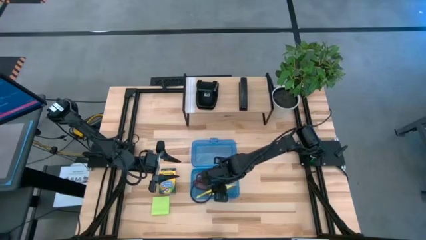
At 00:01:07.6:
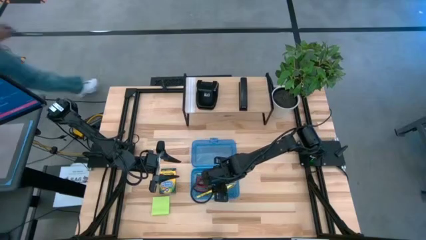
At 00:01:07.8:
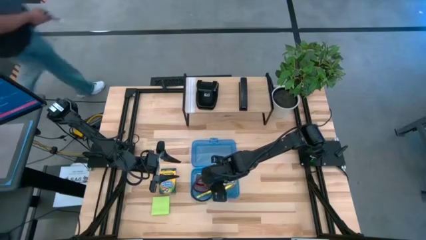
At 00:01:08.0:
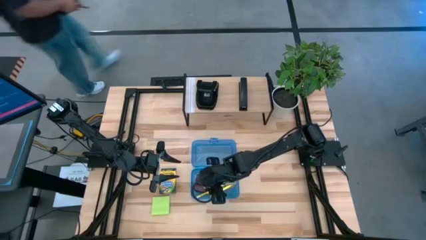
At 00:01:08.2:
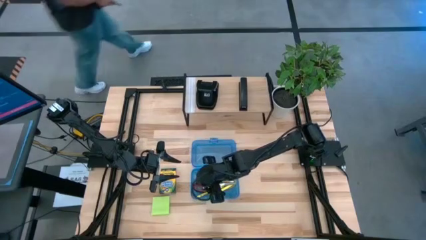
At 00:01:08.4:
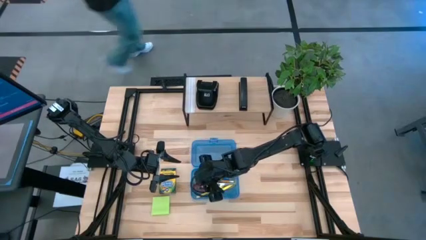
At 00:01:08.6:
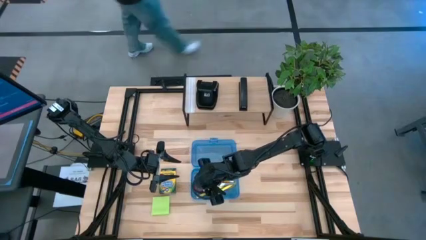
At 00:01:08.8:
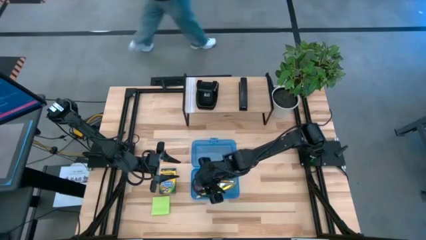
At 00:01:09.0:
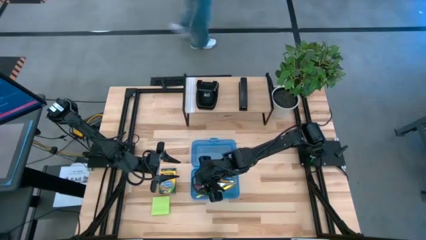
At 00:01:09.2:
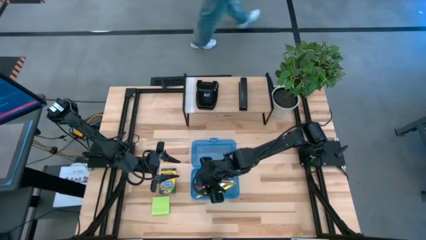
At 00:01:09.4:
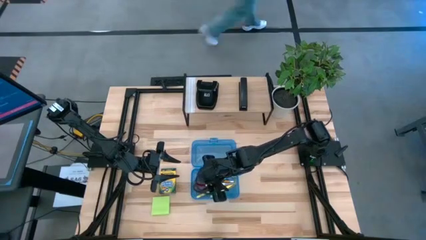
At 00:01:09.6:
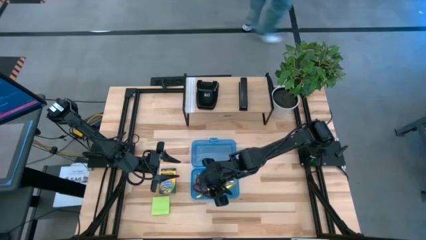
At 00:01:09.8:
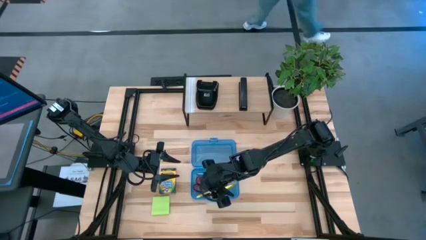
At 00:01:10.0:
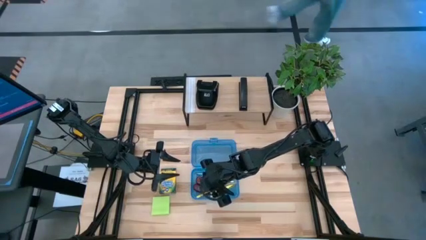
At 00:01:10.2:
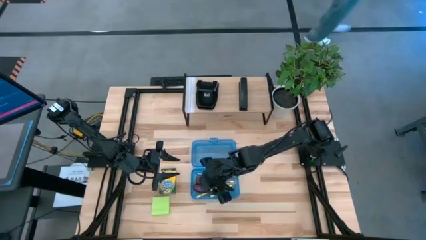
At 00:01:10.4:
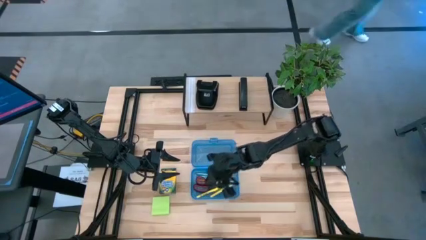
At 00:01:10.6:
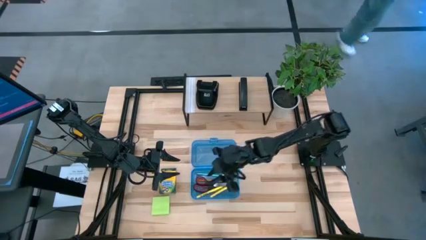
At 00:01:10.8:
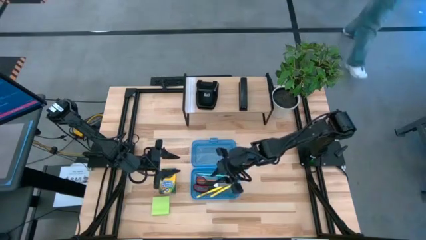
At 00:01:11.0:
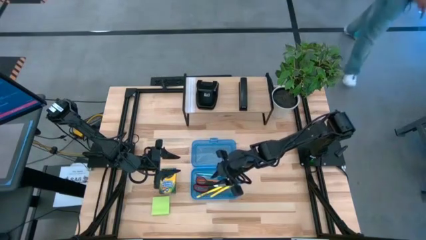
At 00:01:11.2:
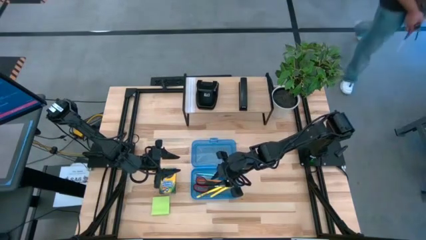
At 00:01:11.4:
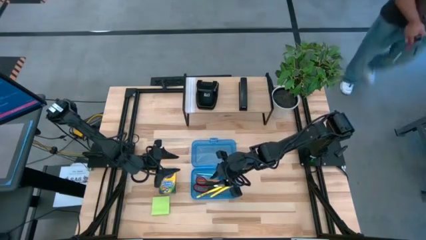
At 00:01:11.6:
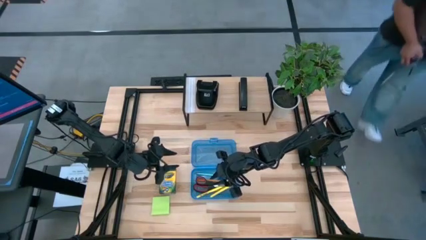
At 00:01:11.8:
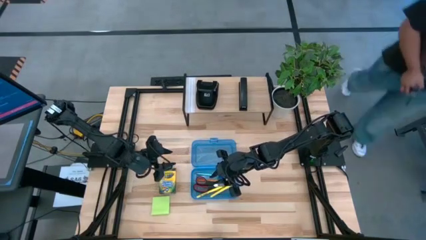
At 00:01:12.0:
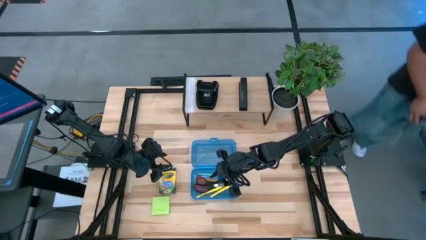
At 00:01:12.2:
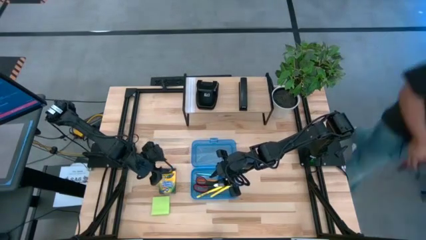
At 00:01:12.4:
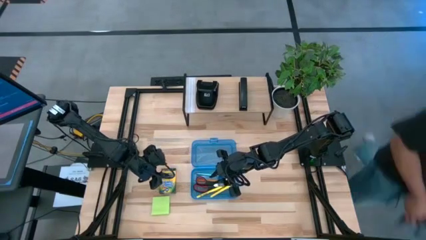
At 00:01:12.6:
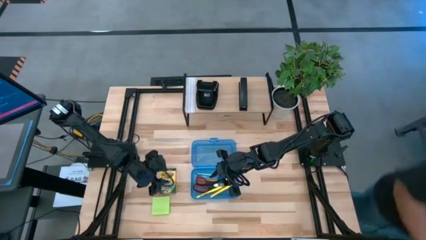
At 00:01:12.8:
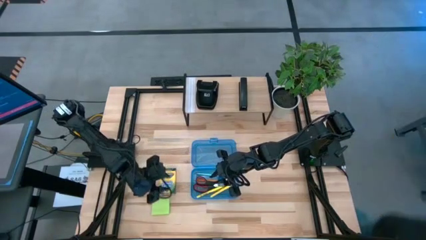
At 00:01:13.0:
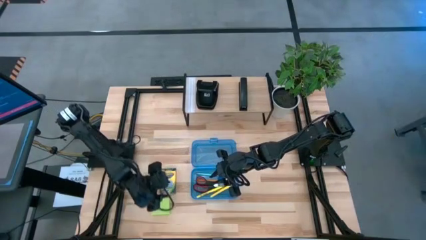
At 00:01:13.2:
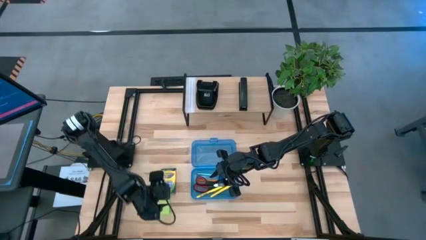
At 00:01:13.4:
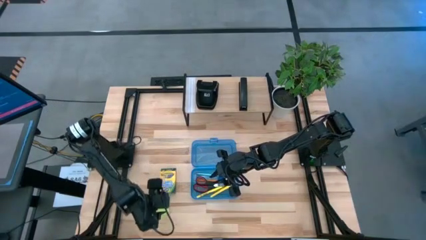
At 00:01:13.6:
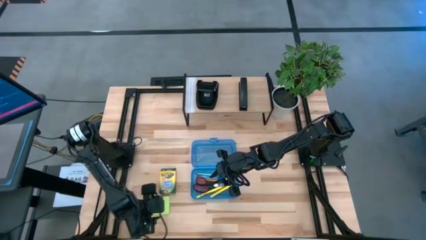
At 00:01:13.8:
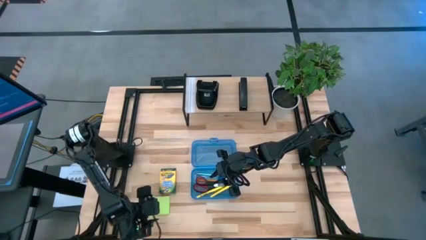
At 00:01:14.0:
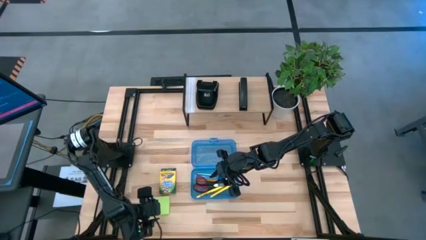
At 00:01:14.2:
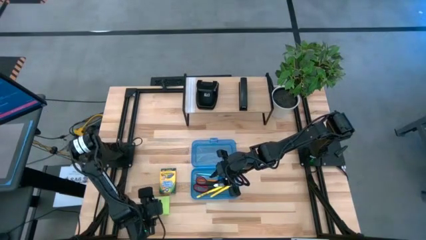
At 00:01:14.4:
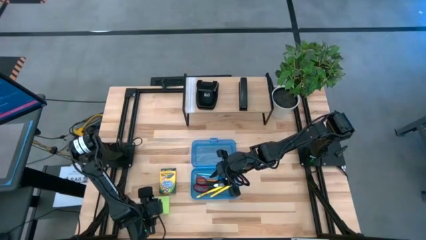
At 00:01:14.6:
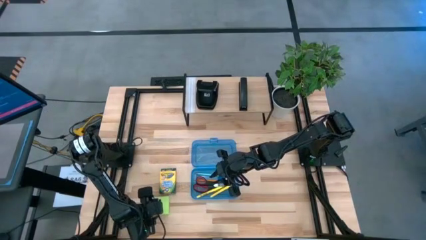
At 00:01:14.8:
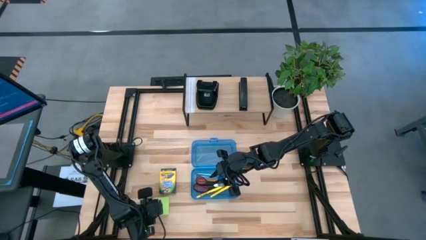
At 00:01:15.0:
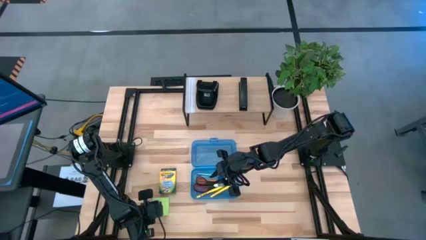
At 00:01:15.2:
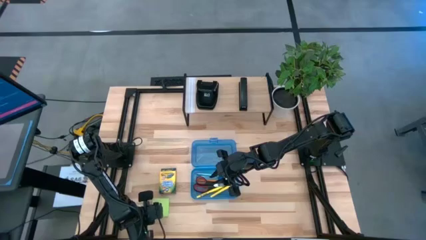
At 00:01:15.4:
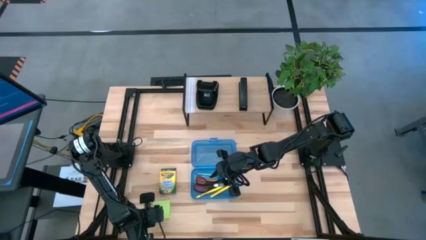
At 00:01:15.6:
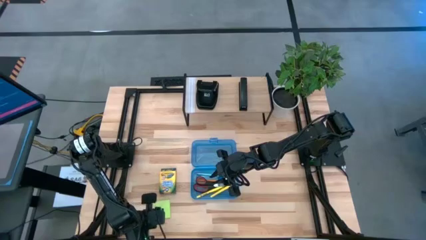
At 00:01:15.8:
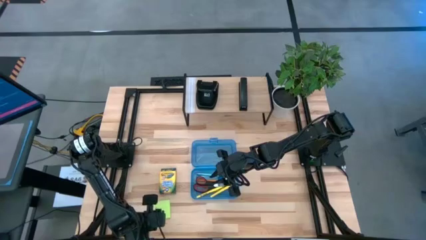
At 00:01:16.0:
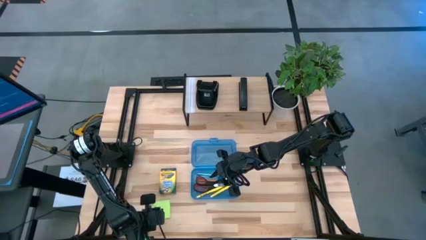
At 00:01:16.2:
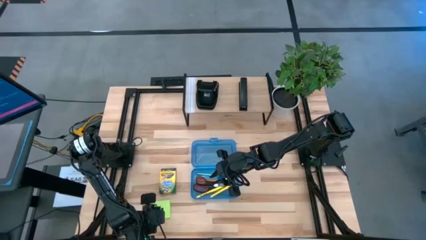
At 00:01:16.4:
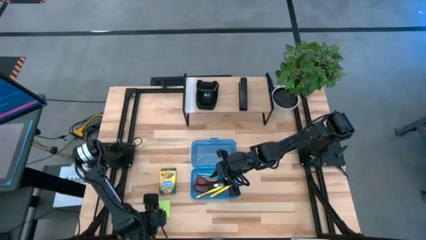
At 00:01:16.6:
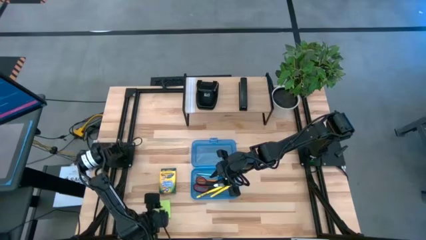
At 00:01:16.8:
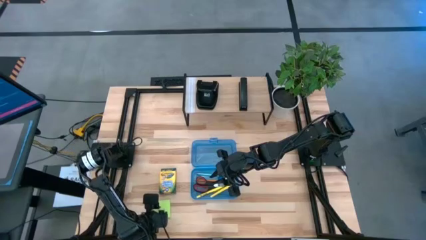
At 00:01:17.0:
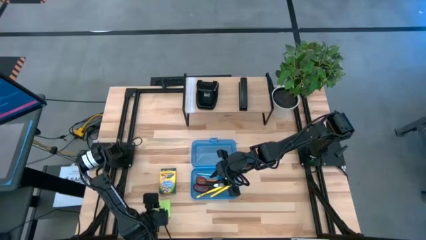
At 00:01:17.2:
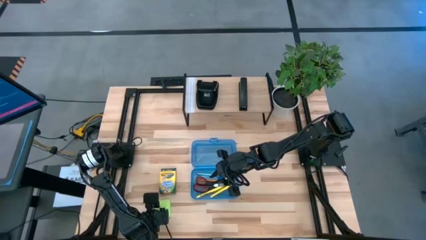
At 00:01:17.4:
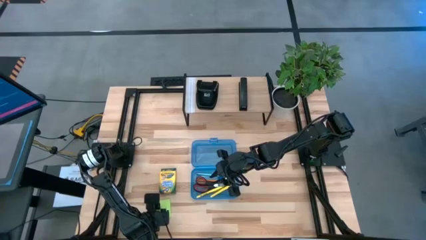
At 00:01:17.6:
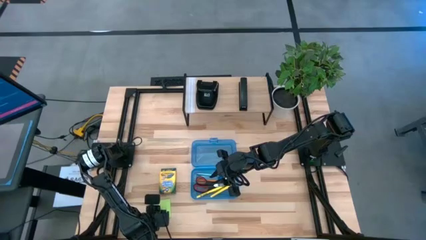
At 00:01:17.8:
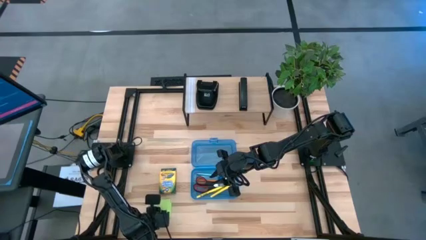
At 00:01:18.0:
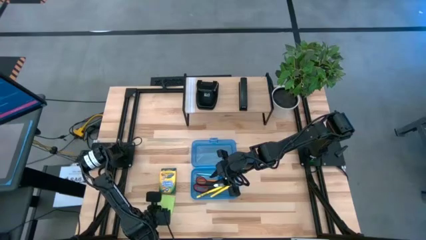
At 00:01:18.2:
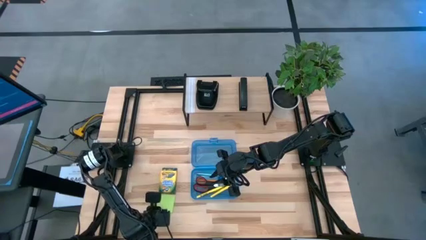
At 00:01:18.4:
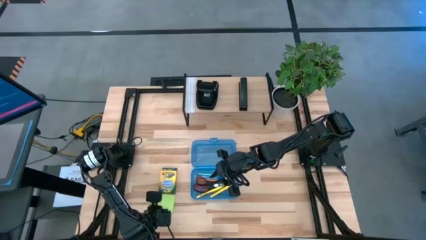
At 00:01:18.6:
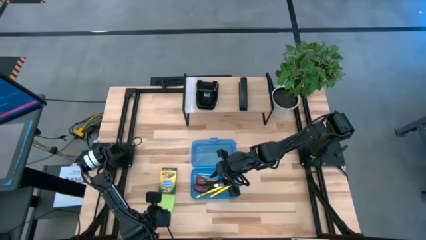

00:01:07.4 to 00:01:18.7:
Task: Pack school essentials
Put the green sticky notes into the blue supply box
